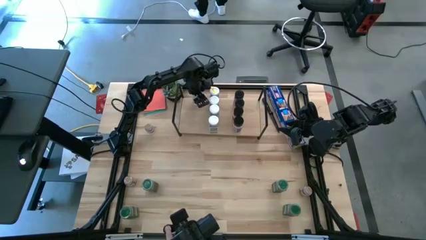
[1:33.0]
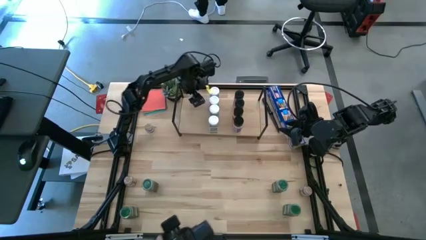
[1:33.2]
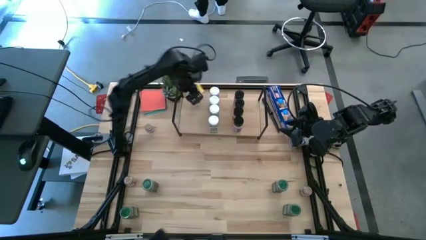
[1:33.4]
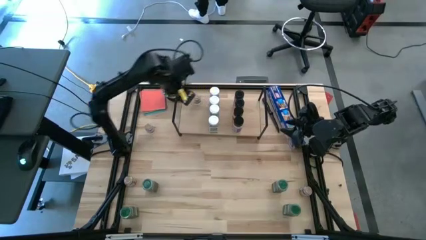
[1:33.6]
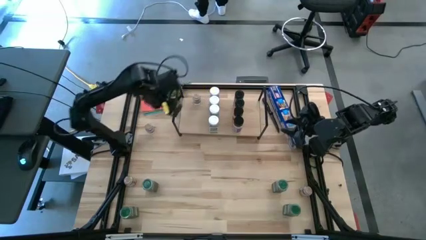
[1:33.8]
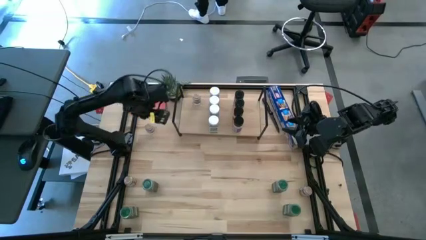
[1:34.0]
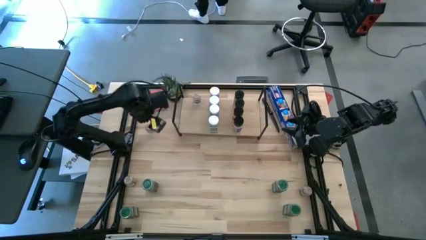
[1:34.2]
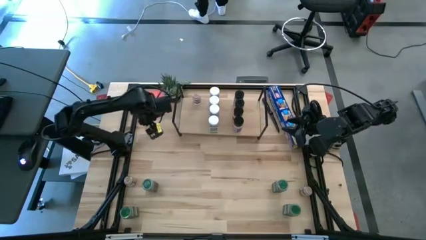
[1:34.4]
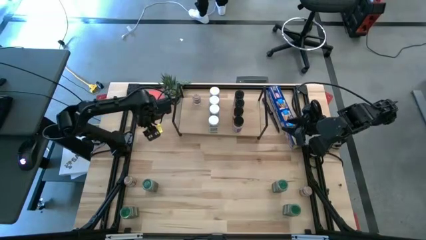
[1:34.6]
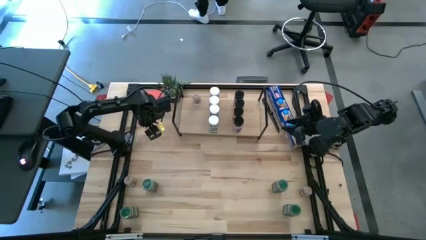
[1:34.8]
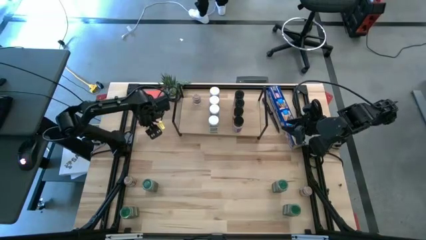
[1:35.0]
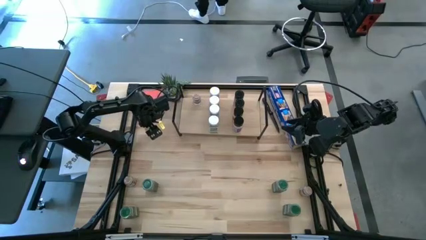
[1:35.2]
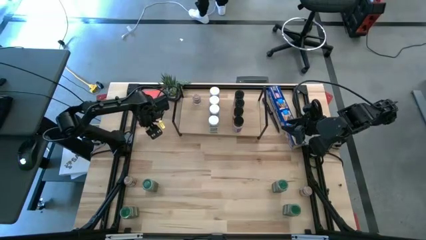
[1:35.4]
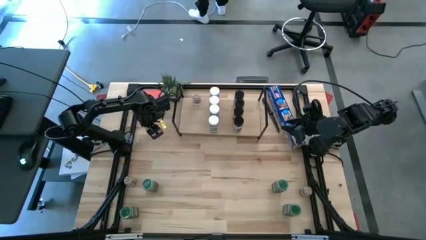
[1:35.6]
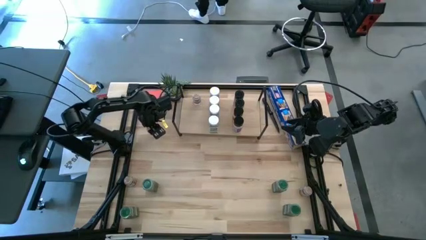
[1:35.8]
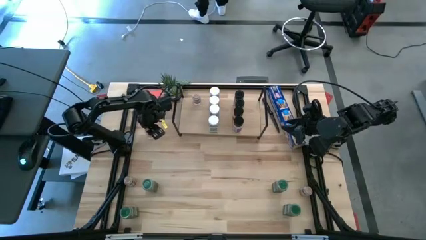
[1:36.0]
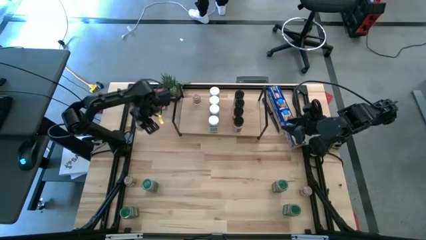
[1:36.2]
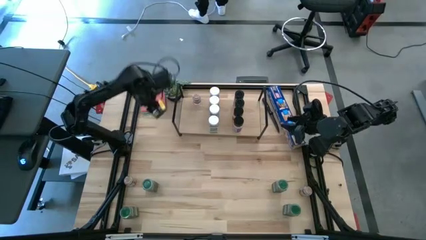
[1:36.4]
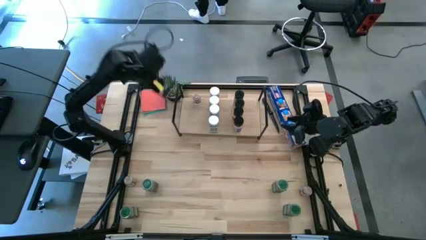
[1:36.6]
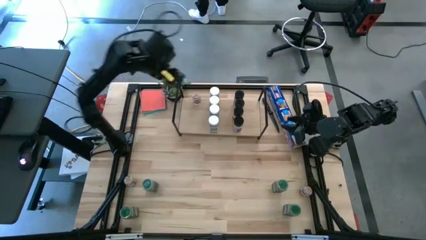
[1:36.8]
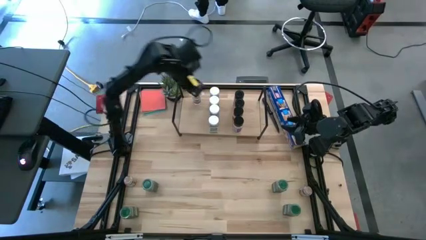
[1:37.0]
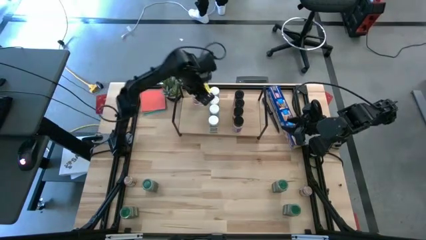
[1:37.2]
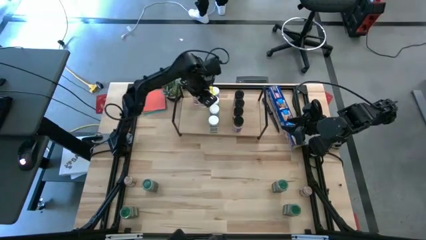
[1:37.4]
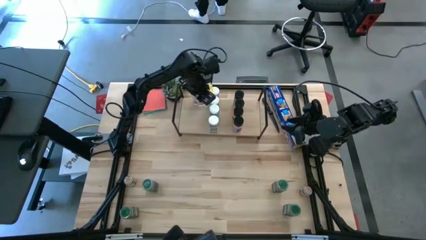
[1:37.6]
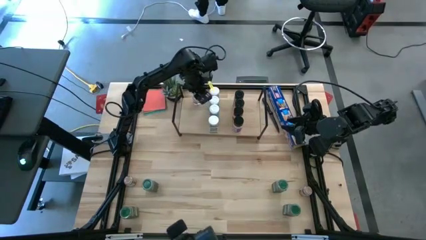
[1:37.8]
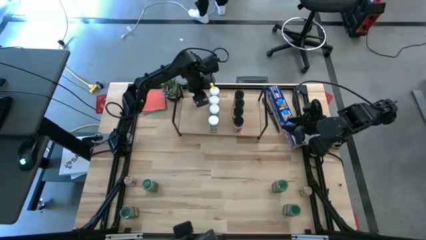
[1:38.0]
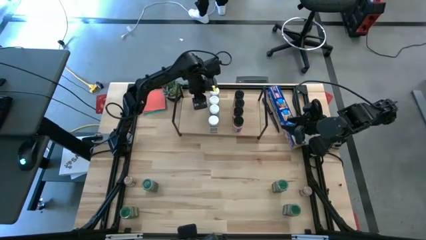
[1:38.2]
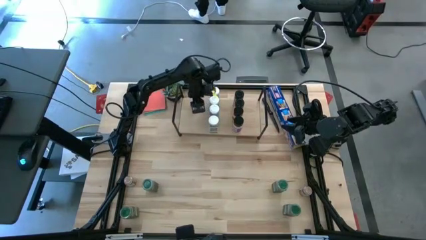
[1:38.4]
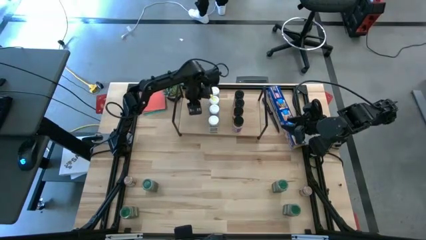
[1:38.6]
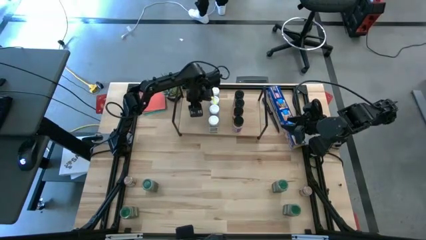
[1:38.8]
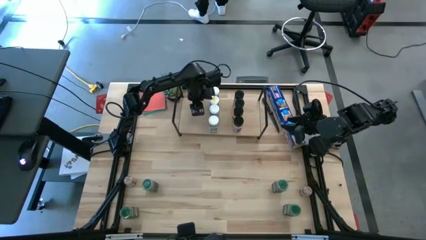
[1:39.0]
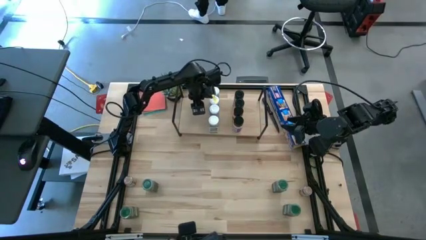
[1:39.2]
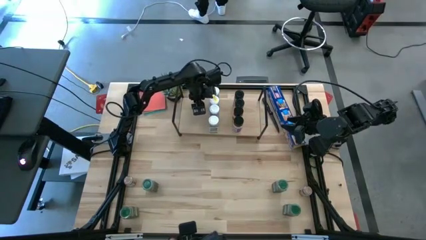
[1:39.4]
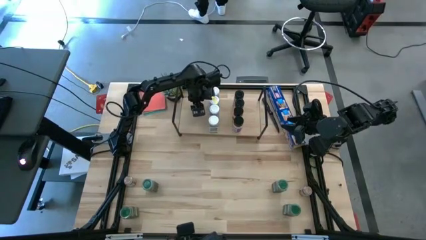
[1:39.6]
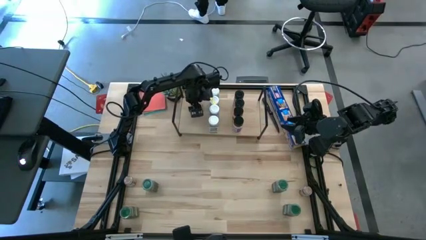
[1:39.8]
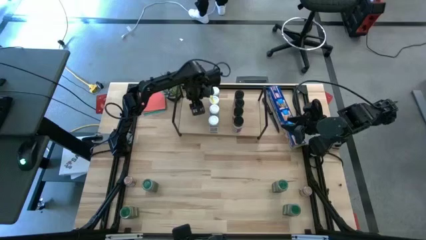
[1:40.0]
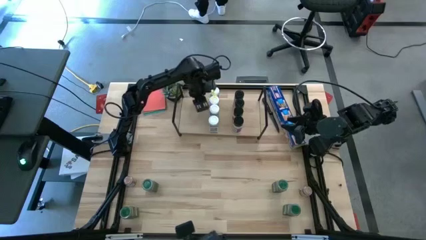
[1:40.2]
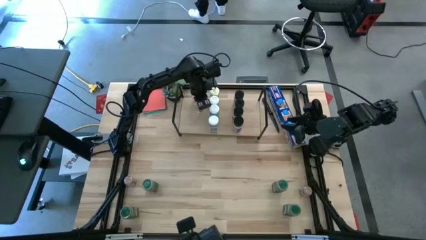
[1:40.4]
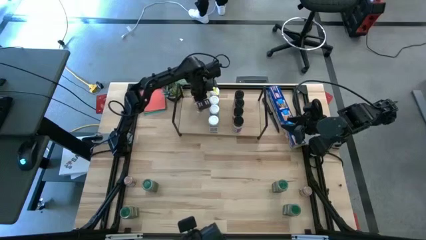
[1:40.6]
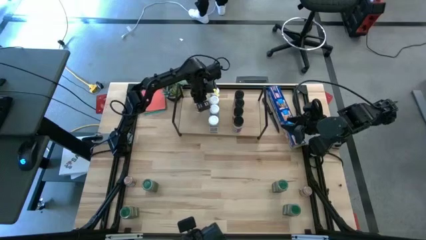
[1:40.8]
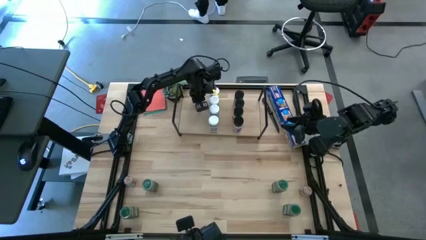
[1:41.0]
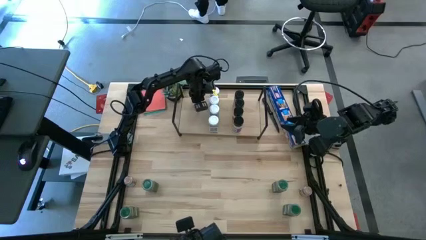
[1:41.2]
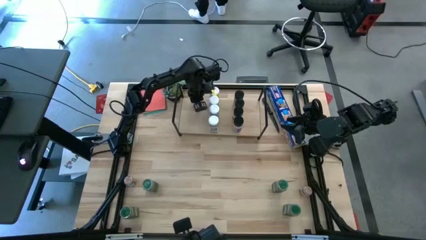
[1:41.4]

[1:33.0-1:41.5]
Task: Shelf spices
Put the brown seasoning bottle on the shelf aligned with the other brown seasoning bottles

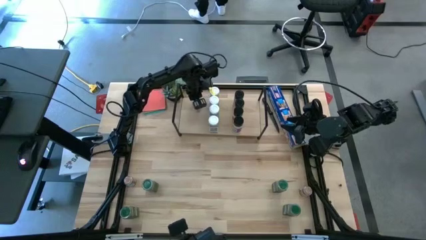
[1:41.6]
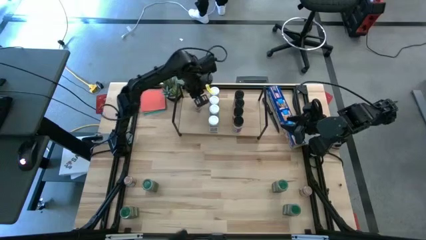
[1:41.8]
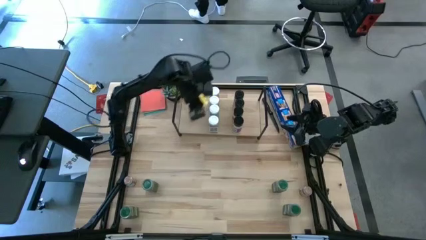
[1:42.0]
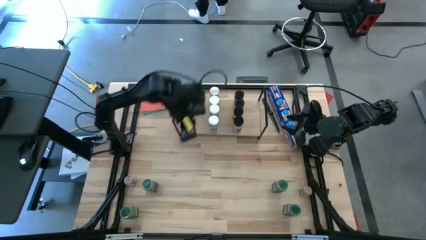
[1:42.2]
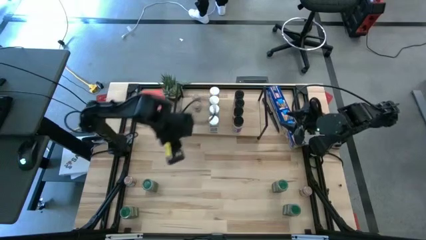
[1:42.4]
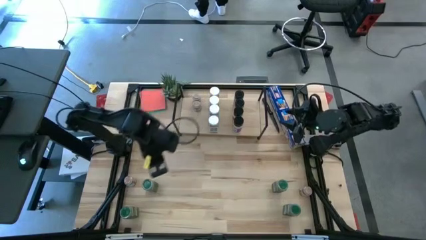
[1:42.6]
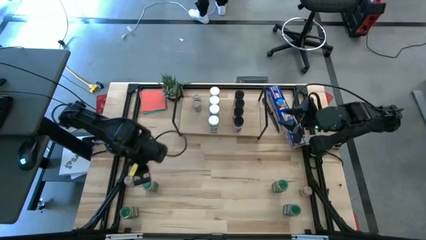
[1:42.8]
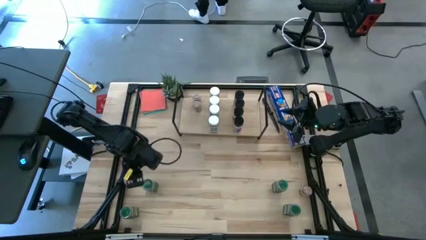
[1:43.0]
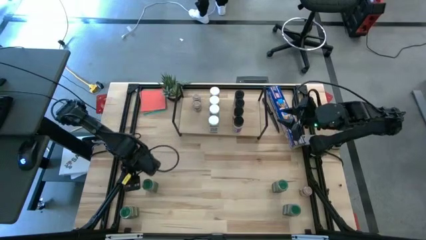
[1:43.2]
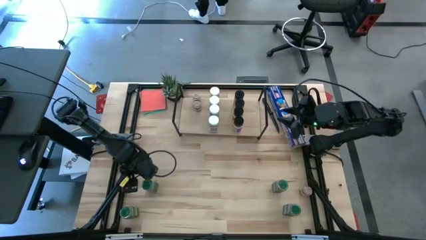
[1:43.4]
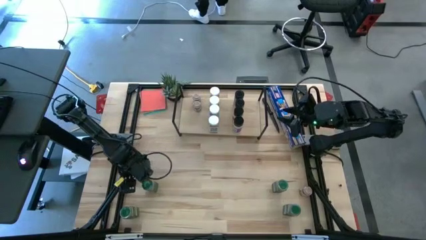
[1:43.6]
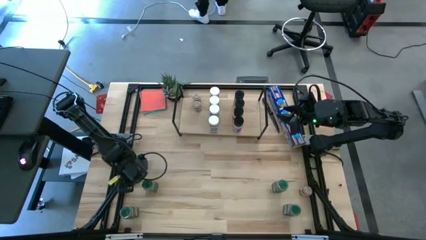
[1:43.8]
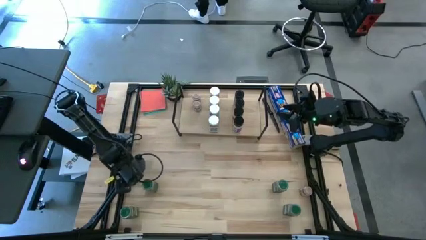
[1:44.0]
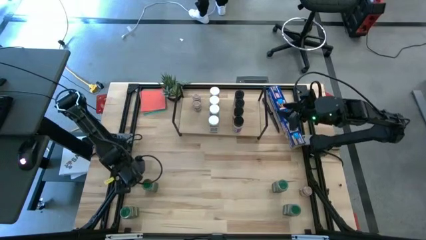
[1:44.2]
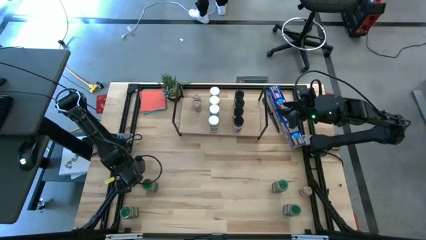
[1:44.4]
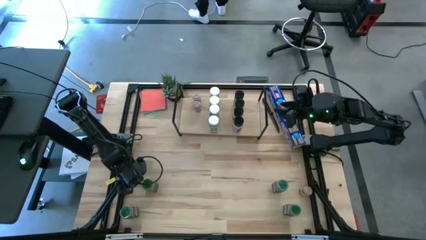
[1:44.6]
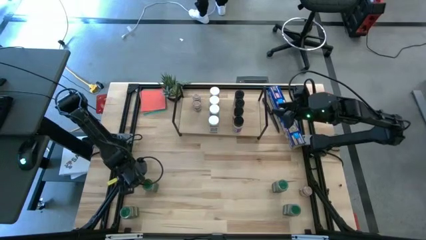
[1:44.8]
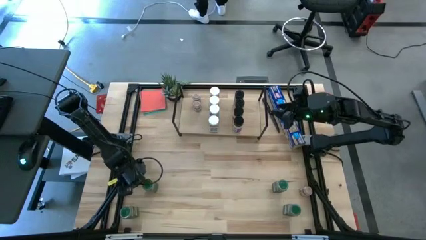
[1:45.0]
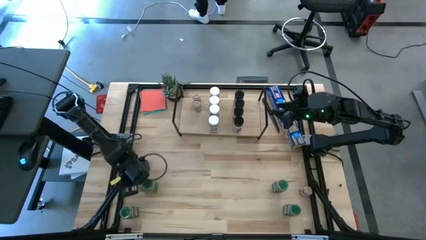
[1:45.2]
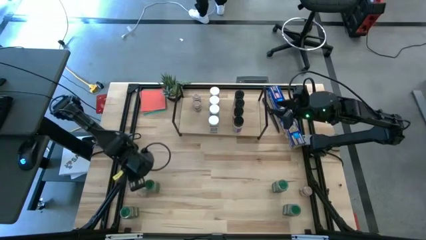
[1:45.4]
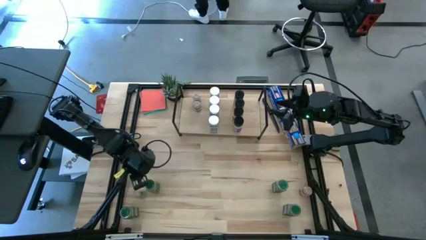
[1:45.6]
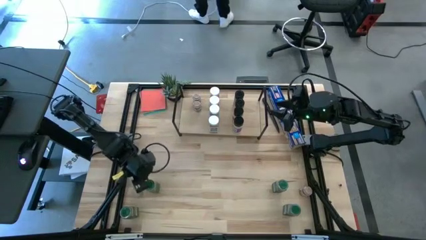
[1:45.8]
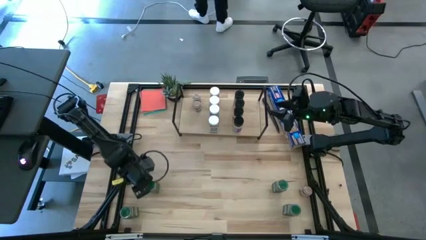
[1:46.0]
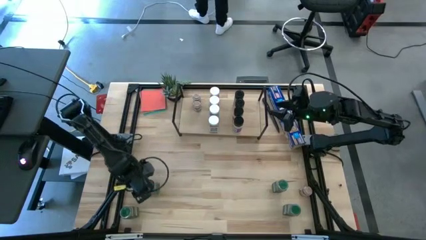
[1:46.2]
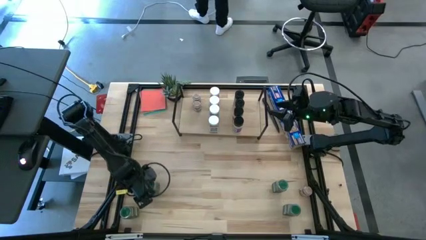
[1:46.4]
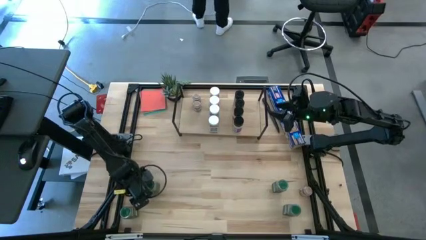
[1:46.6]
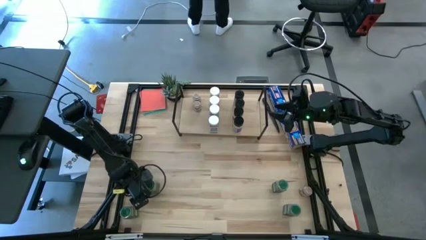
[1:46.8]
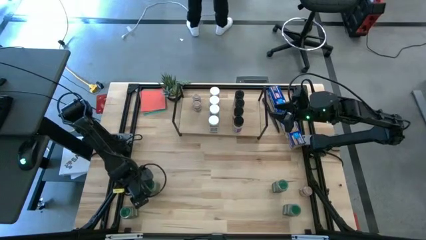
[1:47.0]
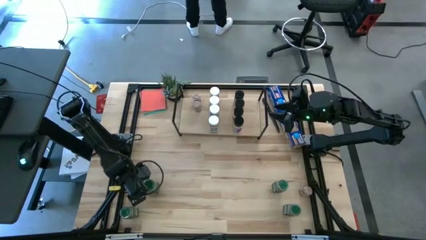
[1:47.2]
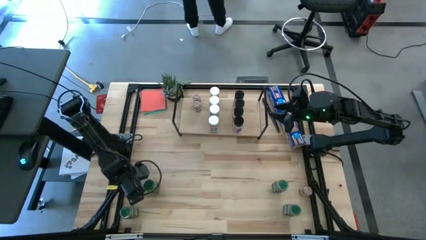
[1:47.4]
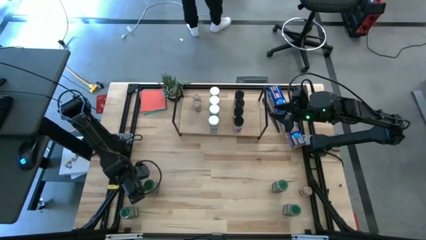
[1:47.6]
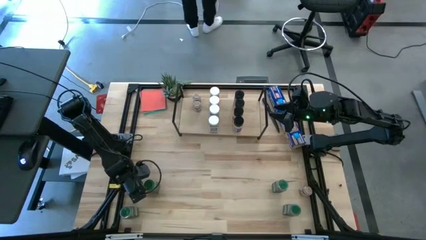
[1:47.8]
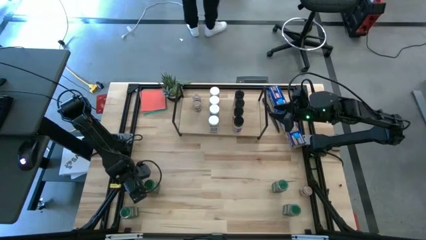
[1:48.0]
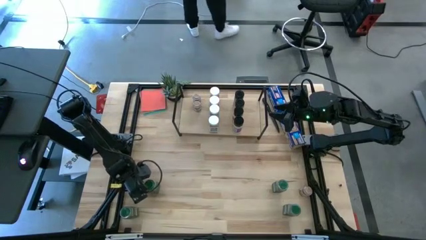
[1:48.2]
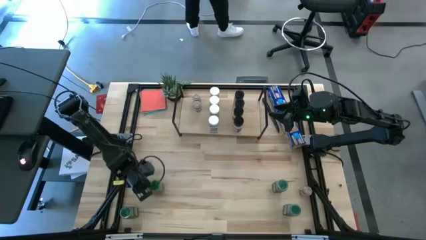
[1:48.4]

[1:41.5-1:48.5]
Put the brown seasoning bottle on the shelf aligned with the other brown seasoning bottles
